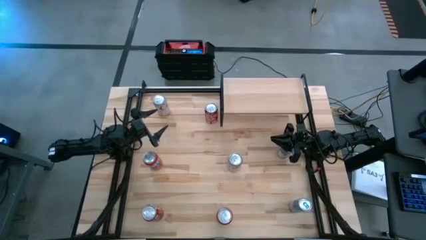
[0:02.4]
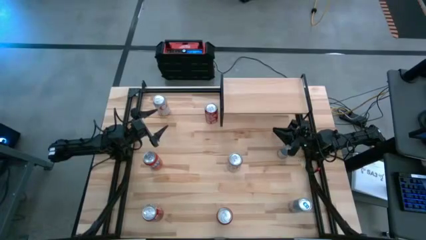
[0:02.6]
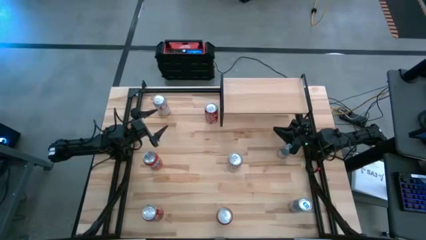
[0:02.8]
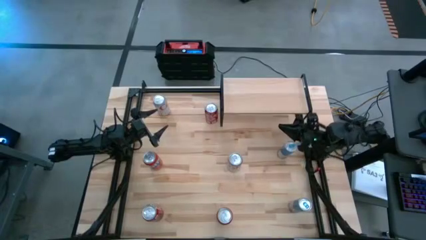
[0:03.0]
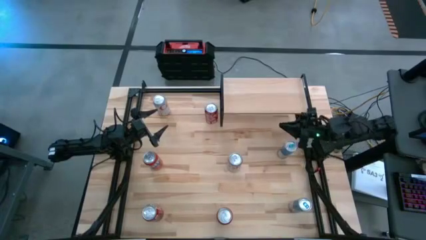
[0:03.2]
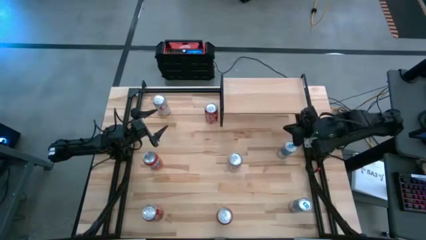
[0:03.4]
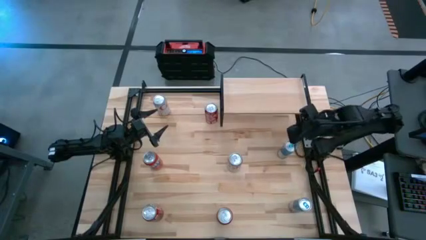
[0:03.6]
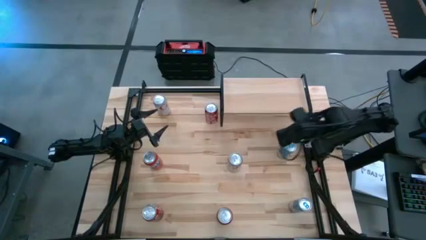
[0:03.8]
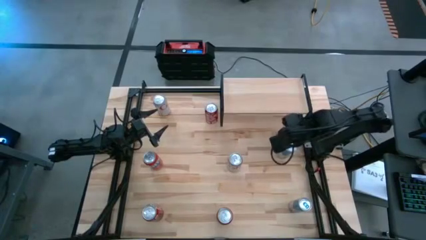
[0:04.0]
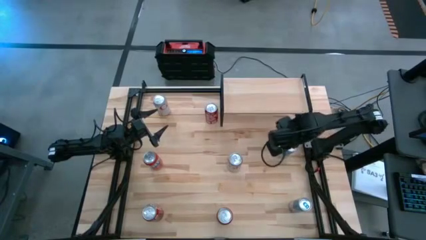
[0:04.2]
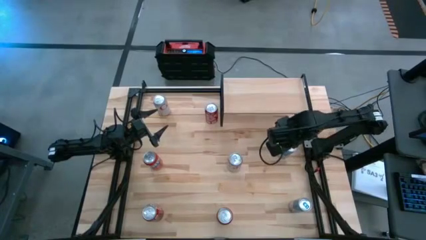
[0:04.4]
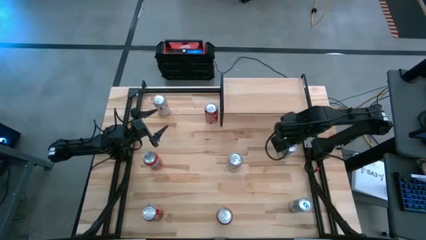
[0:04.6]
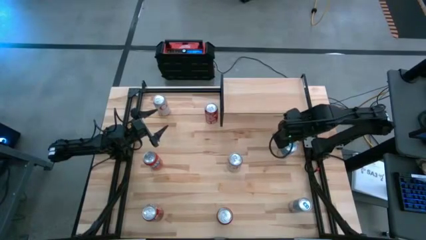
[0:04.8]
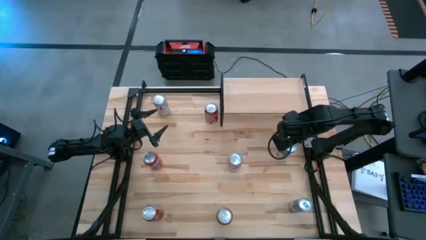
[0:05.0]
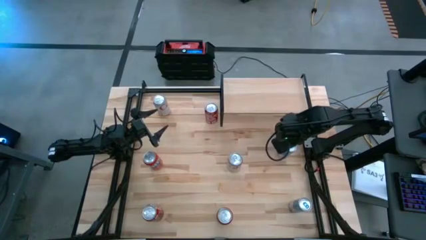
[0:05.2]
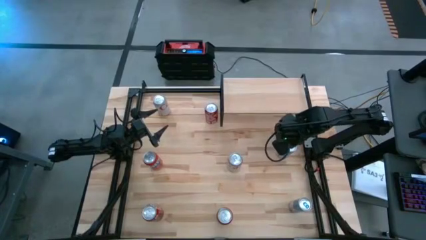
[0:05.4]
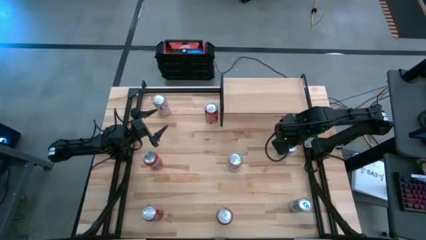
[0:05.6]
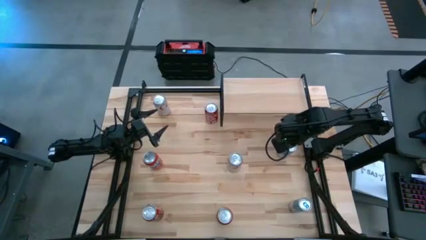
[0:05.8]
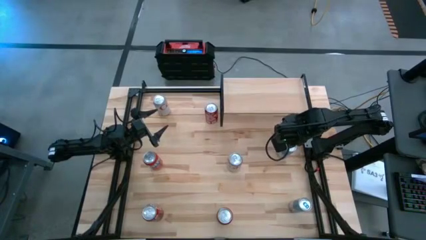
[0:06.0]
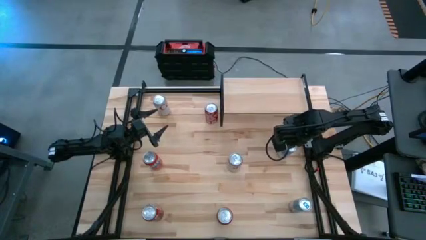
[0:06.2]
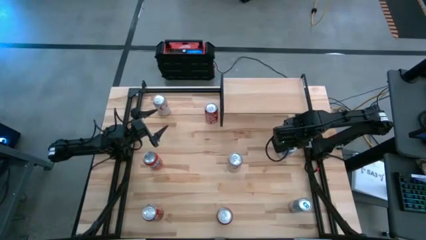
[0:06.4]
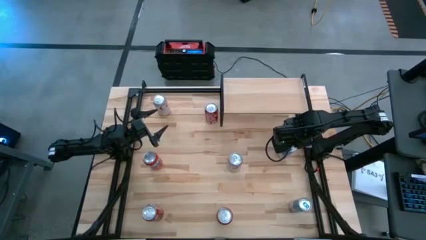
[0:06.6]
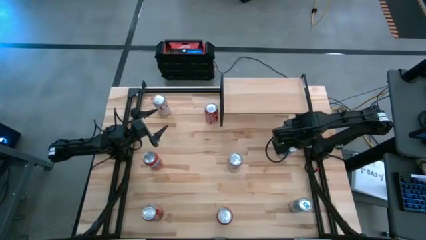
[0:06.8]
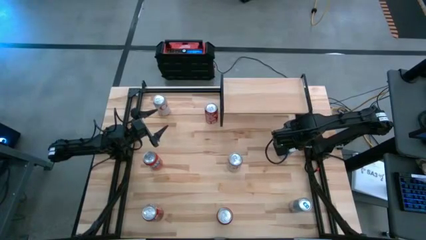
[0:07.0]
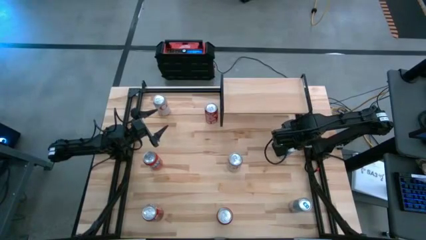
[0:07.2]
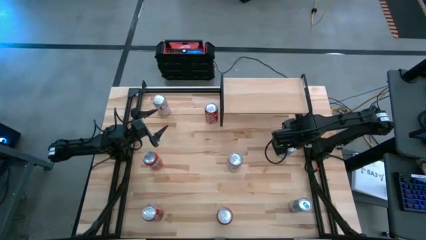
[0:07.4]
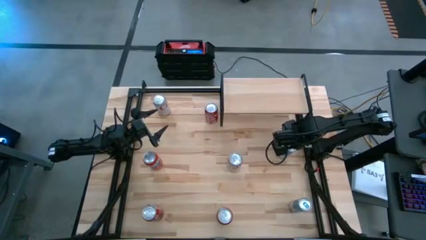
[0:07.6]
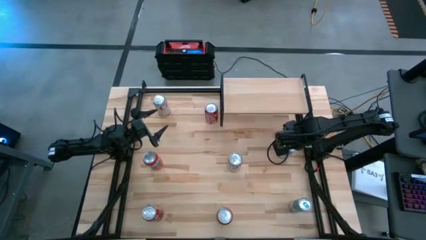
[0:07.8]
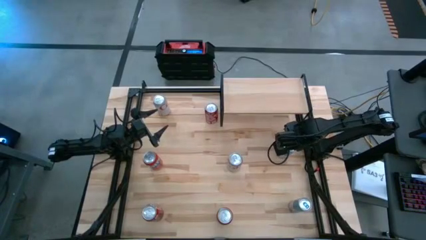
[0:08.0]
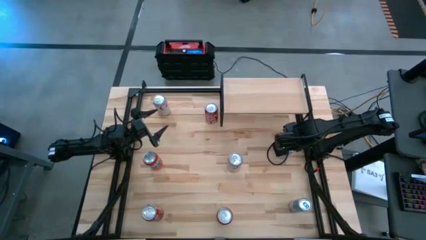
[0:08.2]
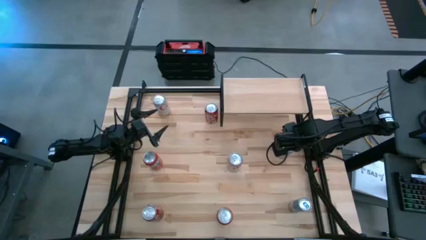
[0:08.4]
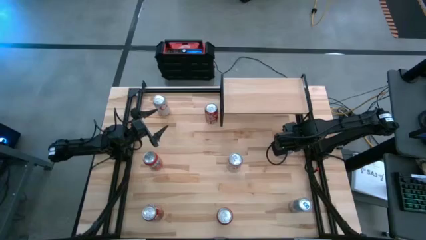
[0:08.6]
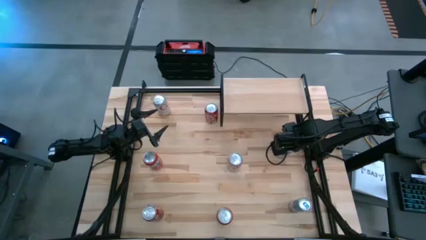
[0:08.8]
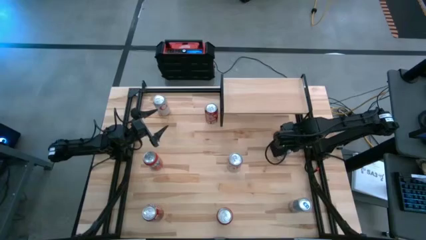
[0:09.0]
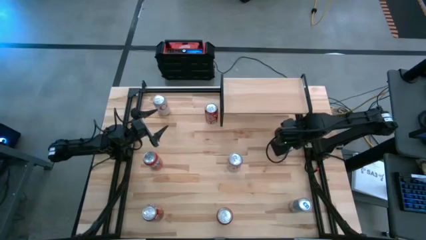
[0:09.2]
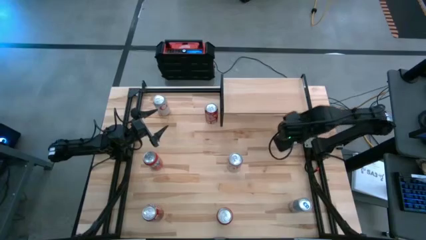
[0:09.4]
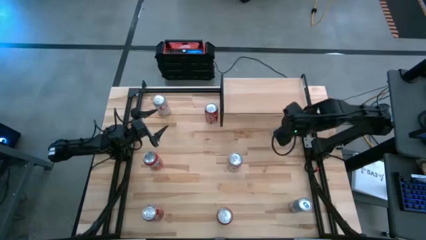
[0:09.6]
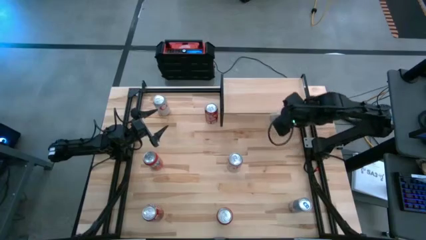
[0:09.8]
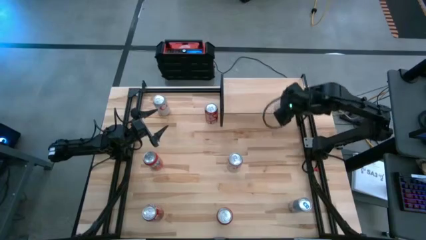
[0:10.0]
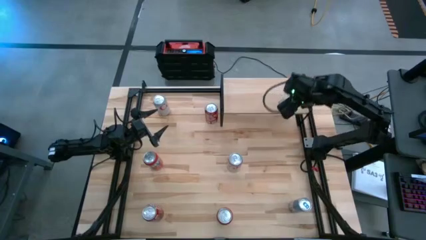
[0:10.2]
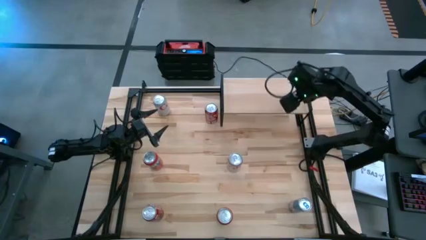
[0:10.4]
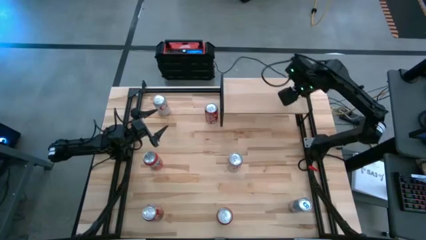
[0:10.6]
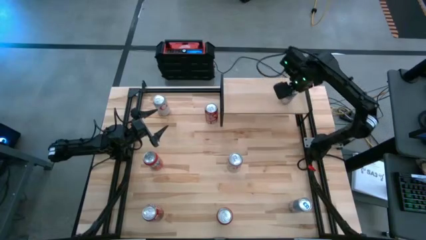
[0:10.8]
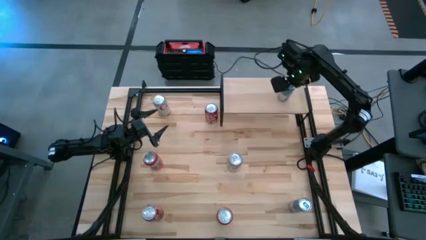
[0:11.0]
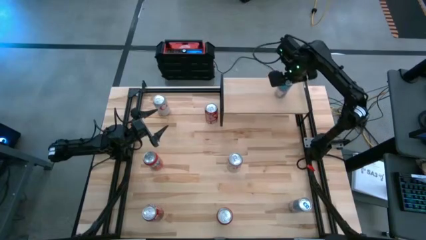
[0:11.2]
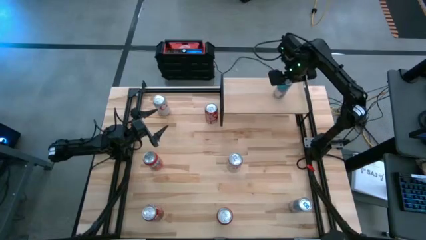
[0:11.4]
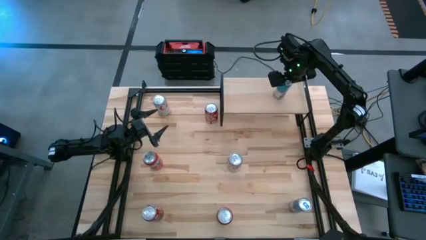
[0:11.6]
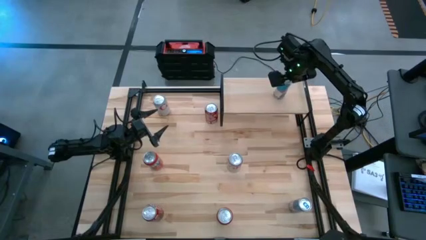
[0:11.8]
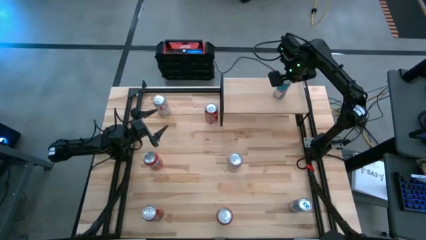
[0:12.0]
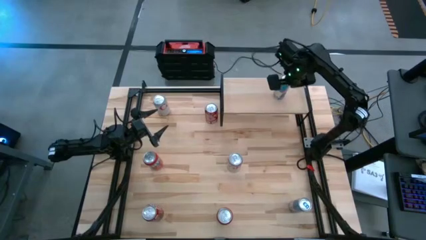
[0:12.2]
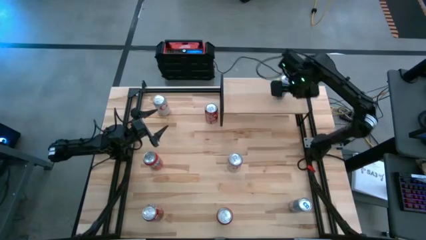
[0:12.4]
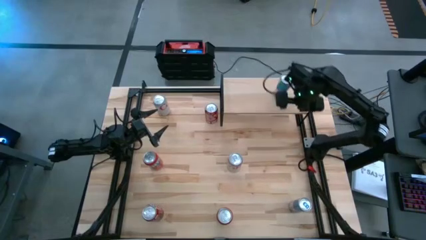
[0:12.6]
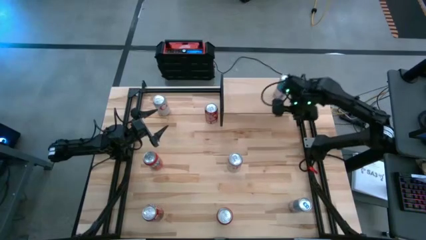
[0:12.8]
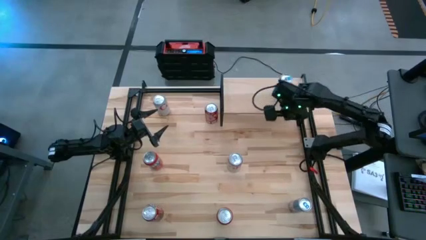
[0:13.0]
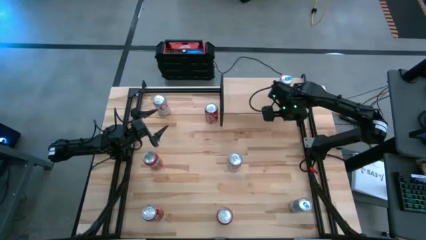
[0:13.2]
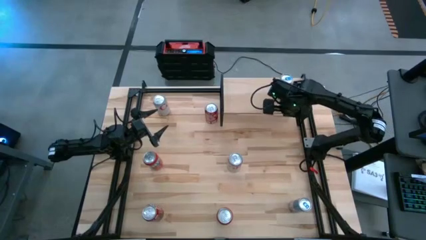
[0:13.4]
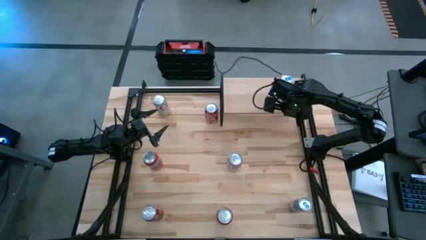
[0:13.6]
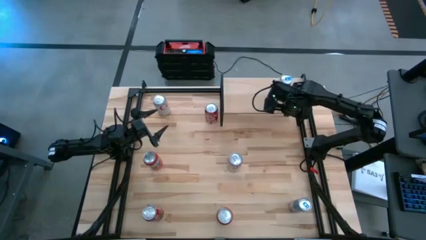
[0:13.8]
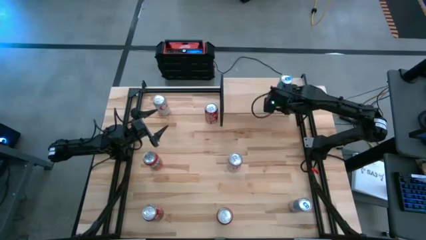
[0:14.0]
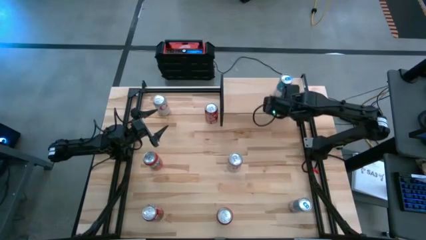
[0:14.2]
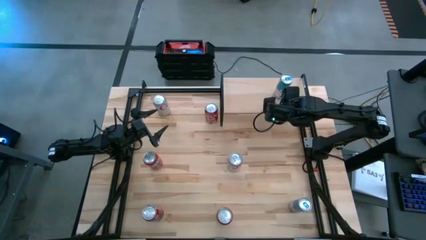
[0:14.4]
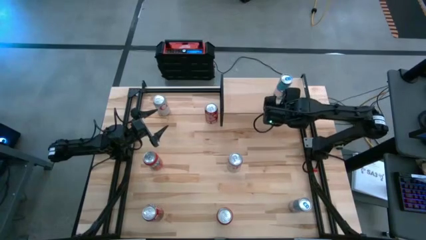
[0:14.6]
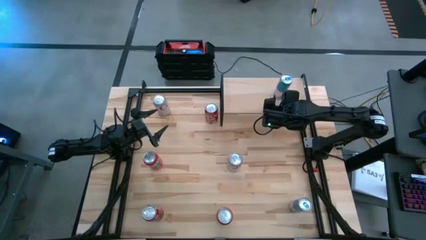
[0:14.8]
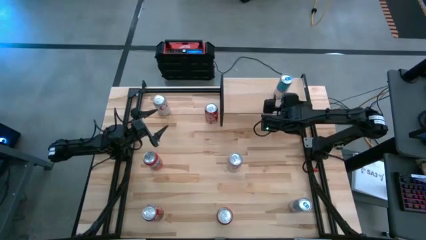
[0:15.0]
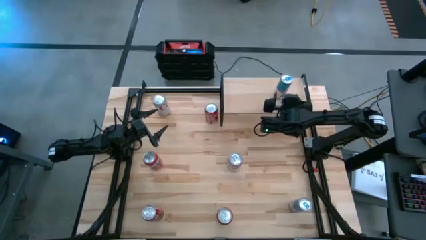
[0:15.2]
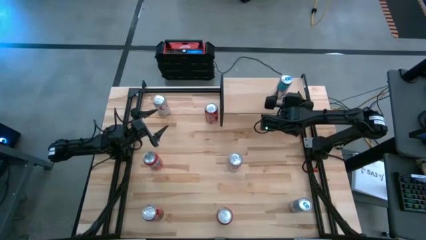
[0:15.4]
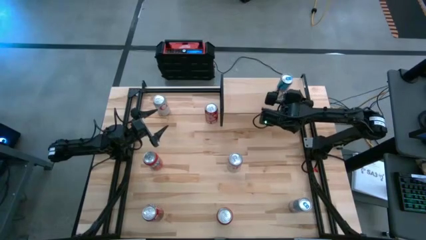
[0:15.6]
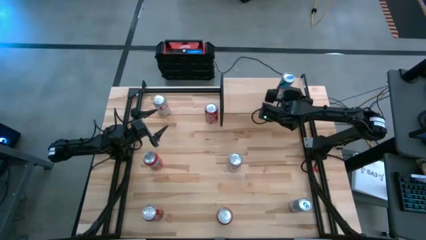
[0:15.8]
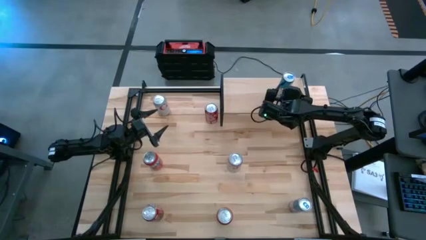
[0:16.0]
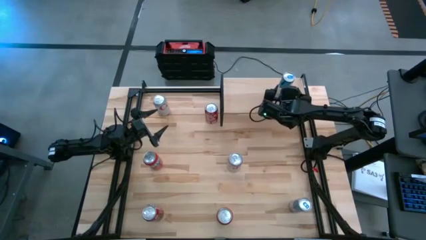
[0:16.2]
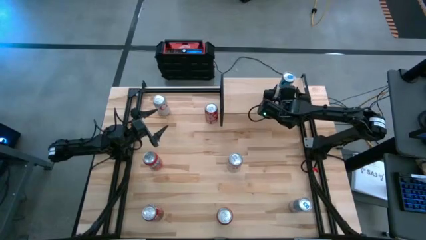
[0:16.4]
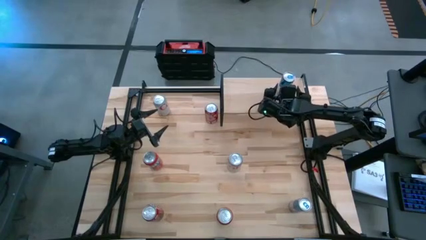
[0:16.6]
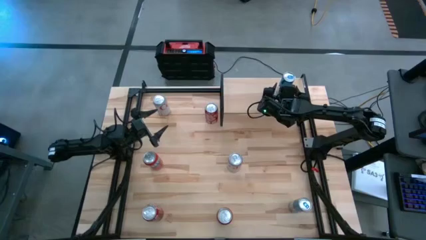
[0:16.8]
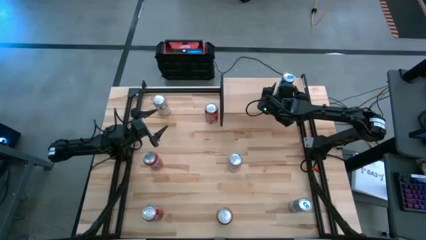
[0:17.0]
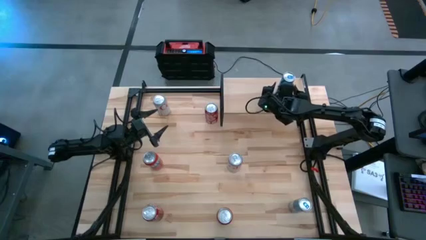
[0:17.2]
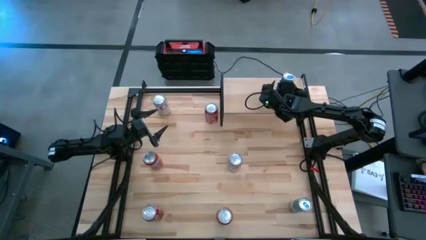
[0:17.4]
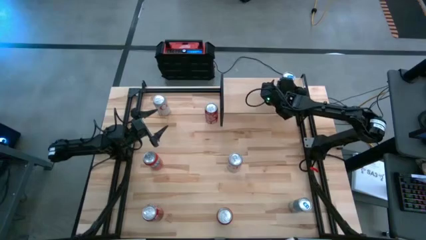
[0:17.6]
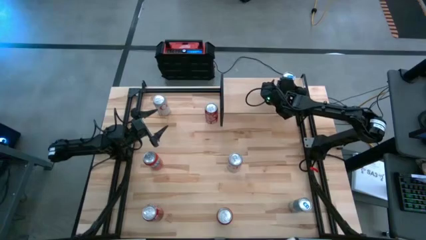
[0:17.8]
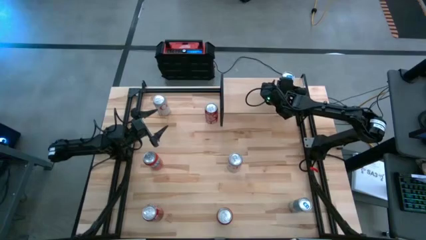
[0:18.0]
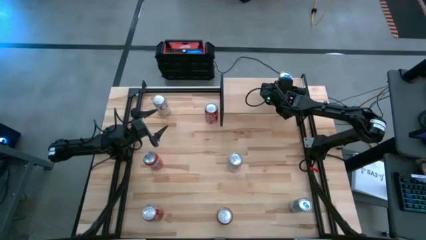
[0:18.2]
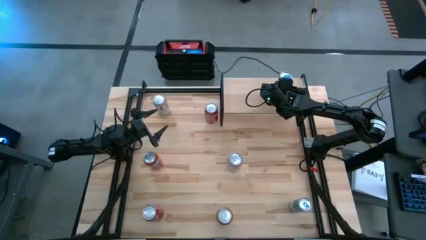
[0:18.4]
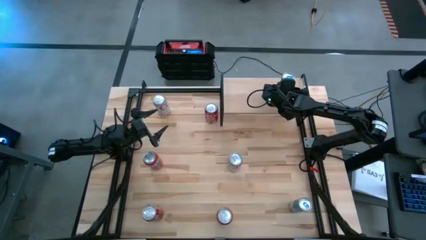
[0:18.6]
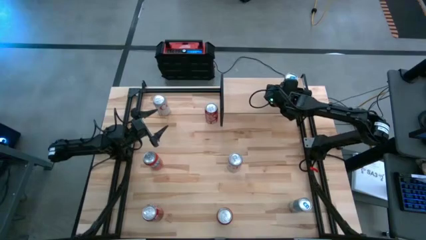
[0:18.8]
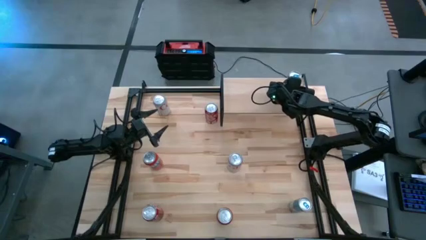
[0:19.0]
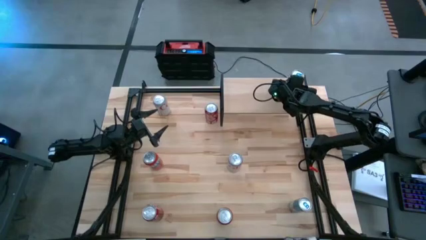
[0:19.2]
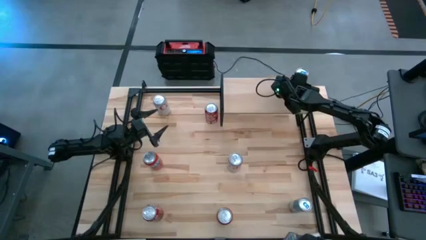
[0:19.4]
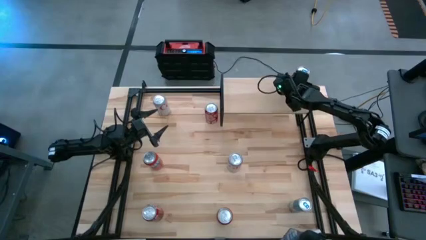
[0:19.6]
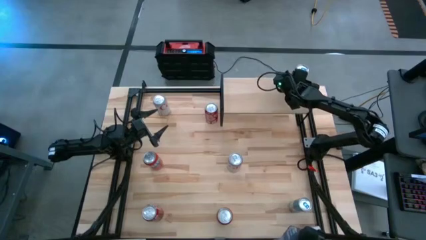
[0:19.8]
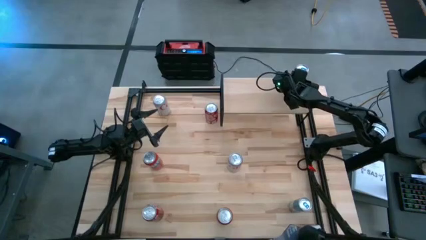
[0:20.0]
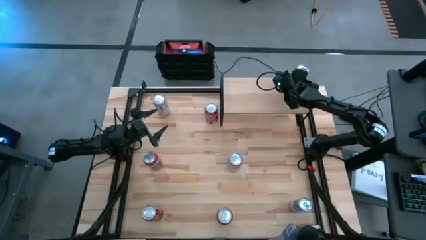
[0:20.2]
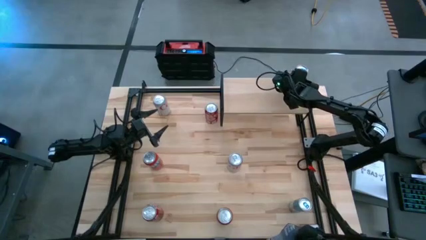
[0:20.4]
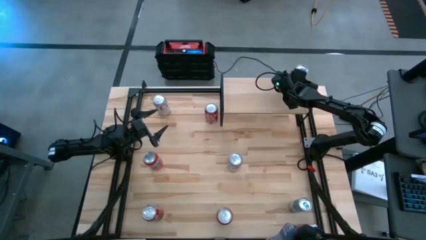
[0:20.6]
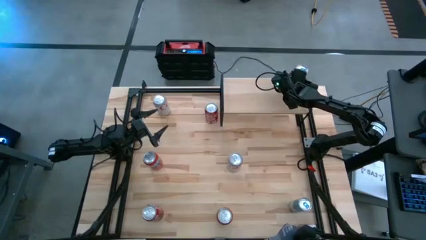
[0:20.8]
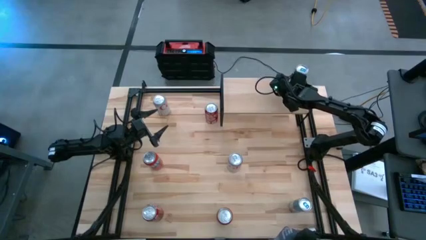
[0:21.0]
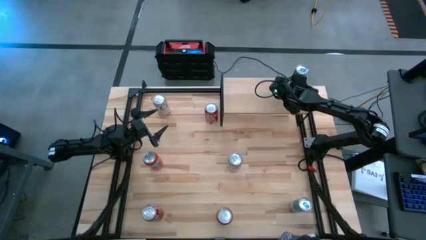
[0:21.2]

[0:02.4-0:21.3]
Task: Place canned beverage on shelf
Put the top blue soda can on the shelf
